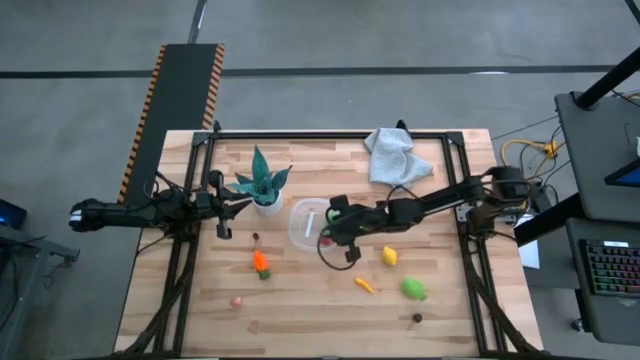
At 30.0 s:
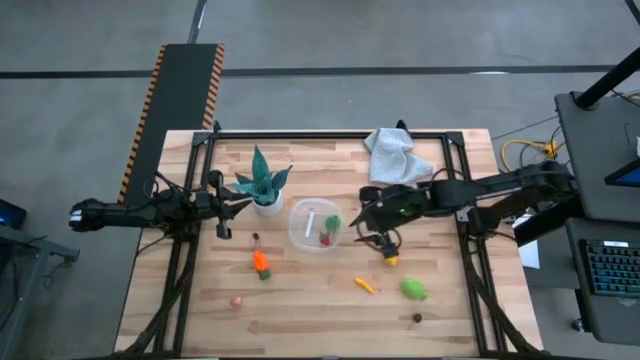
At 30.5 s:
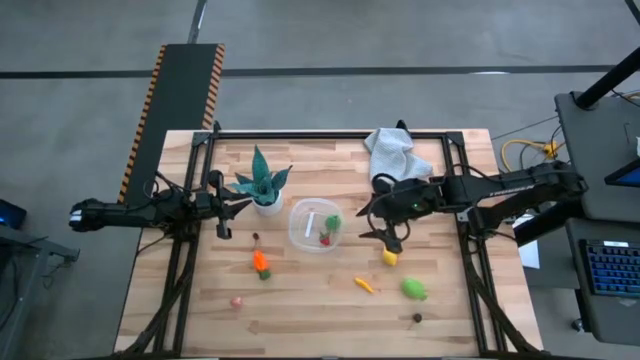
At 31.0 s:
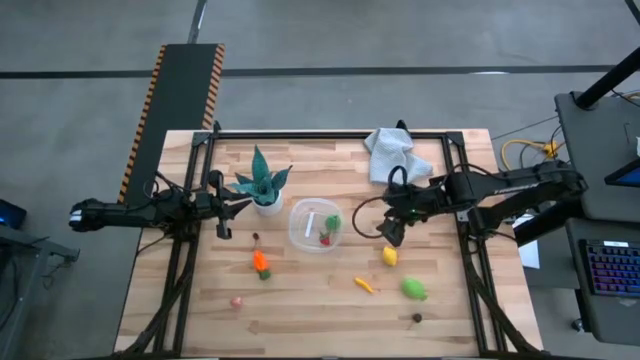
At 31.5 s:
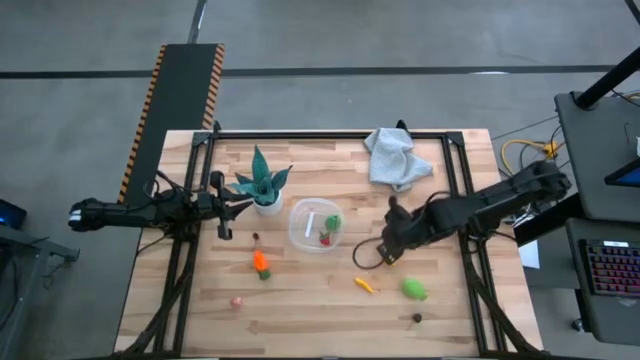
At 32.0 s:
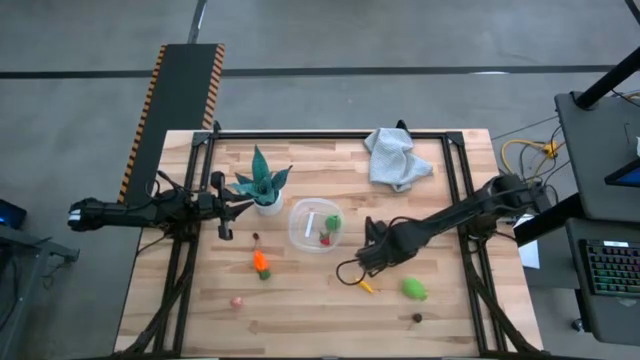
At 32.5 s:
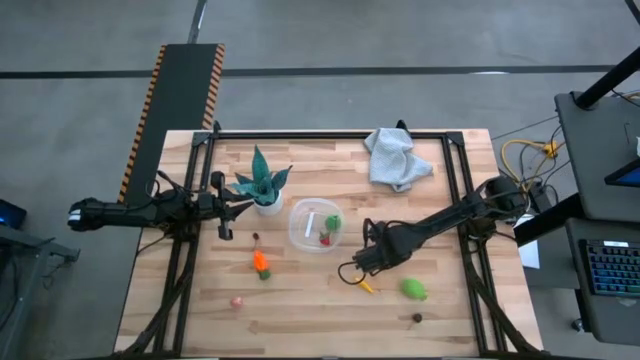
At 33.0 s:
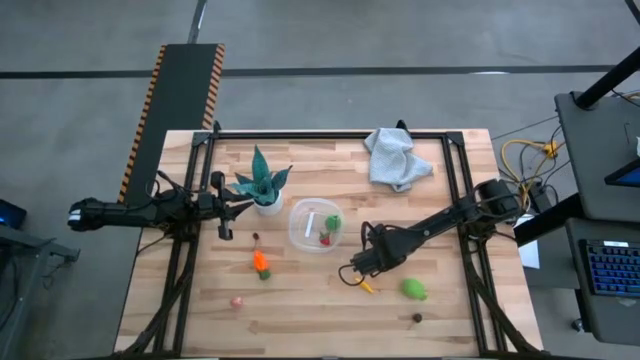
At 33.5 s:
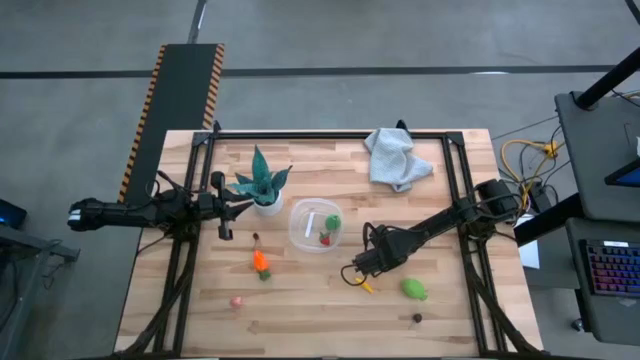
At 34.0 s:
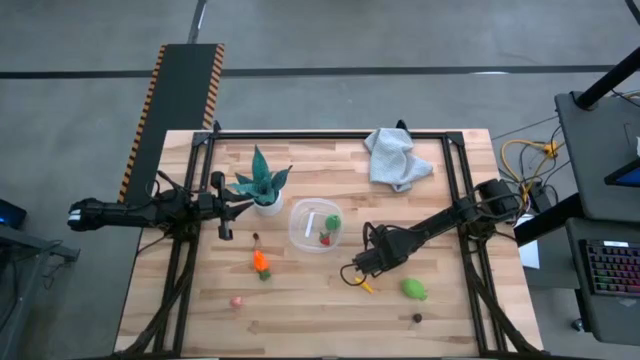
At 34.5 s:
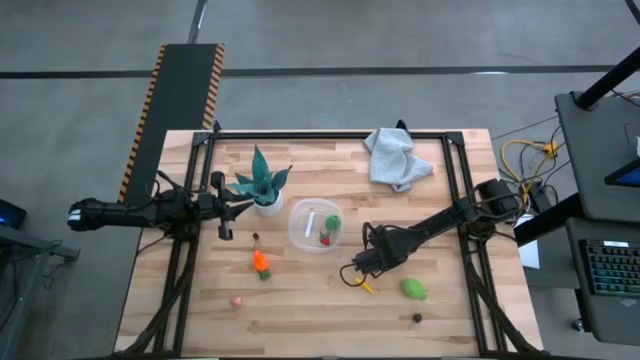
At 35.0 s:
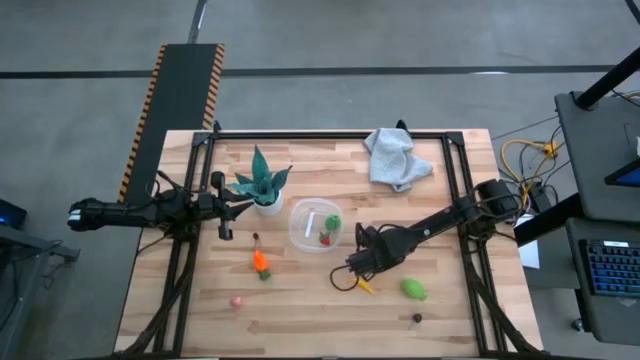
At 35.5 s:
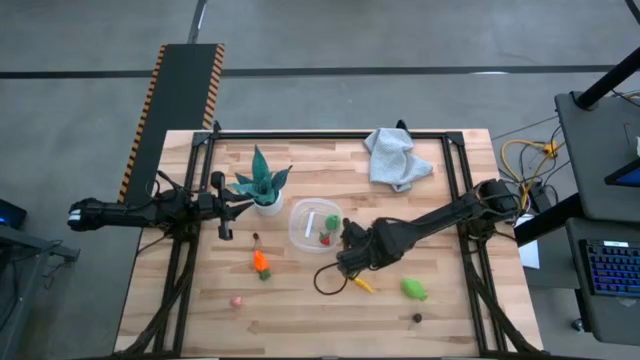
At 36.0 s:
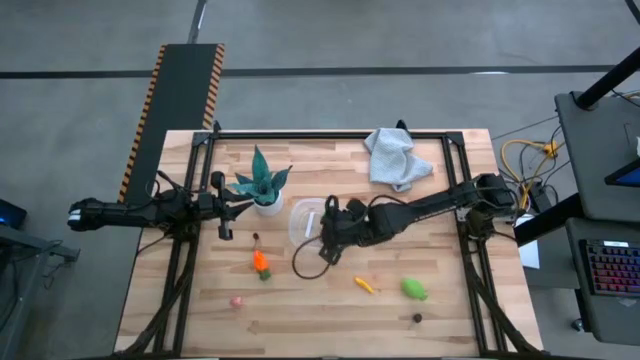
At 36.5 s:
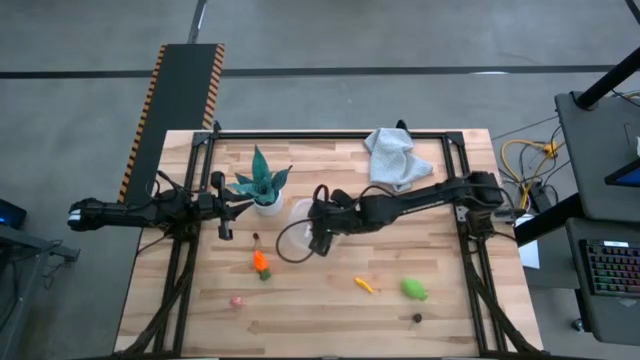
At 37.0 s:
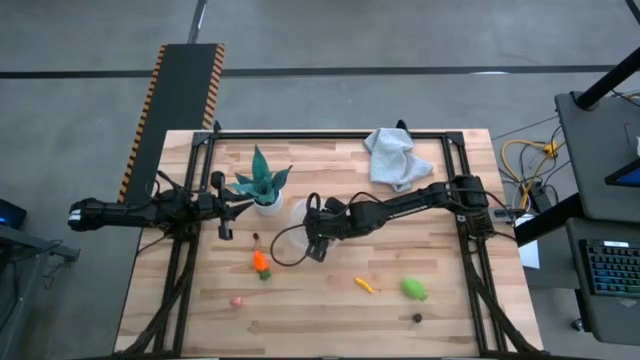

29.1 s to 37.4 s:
Task: Pick and placing Produce into tupperware
Put the yellow lemon into the container

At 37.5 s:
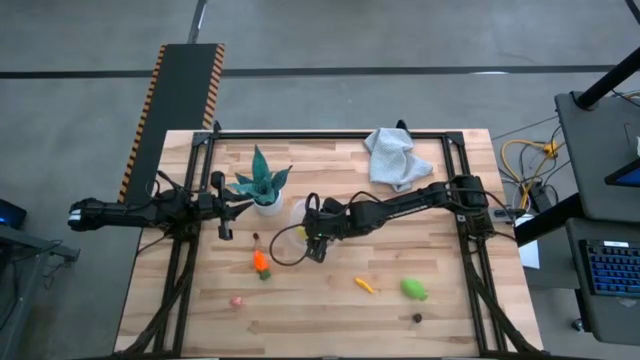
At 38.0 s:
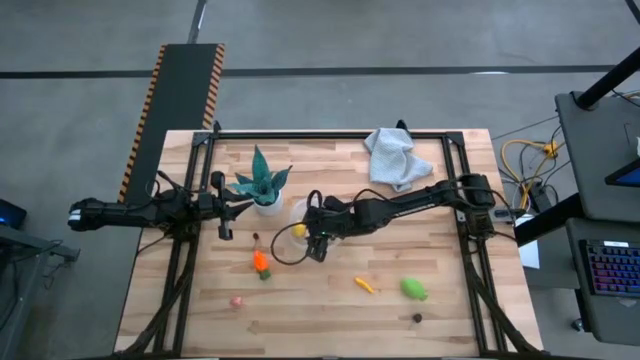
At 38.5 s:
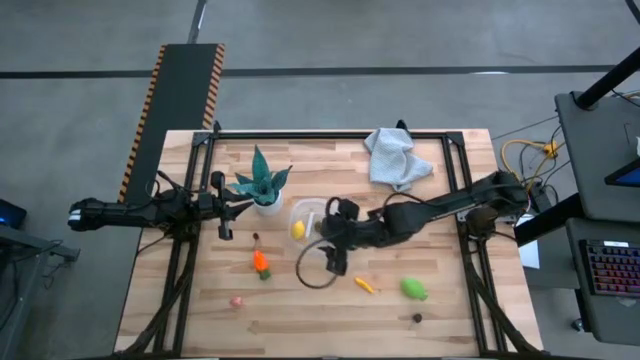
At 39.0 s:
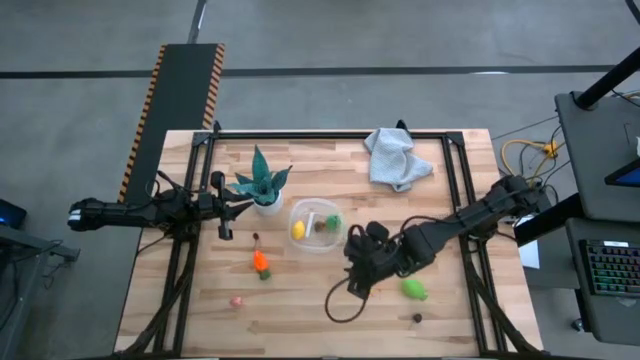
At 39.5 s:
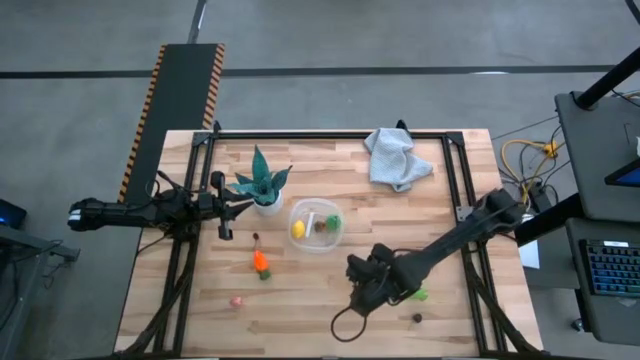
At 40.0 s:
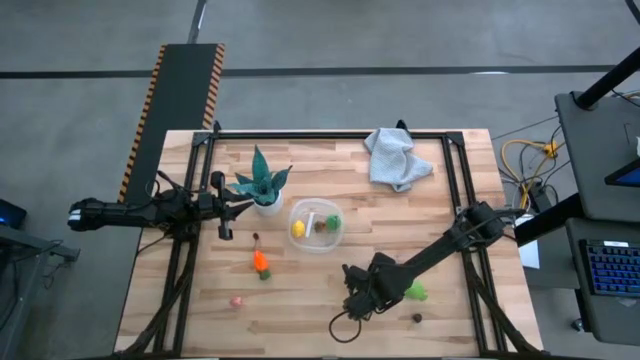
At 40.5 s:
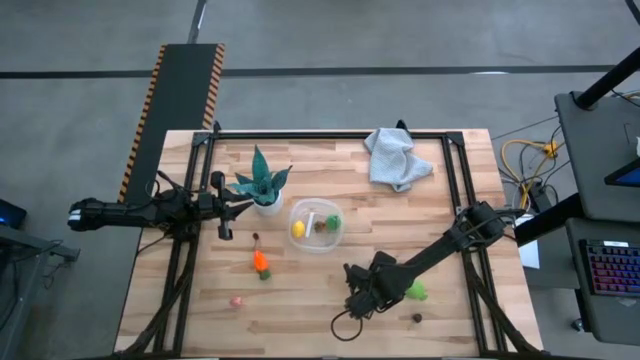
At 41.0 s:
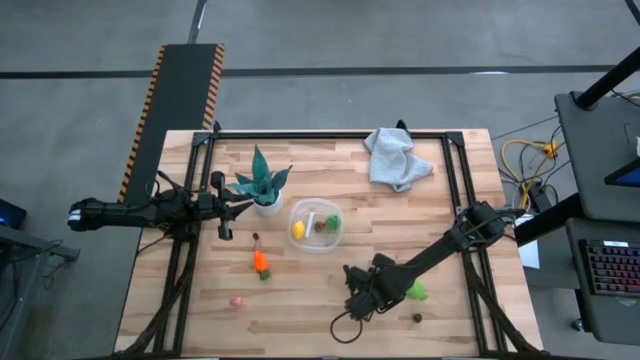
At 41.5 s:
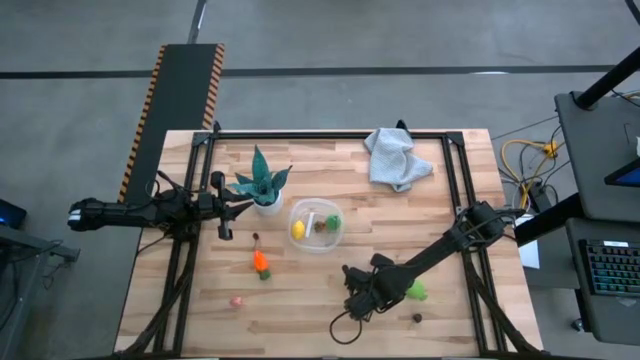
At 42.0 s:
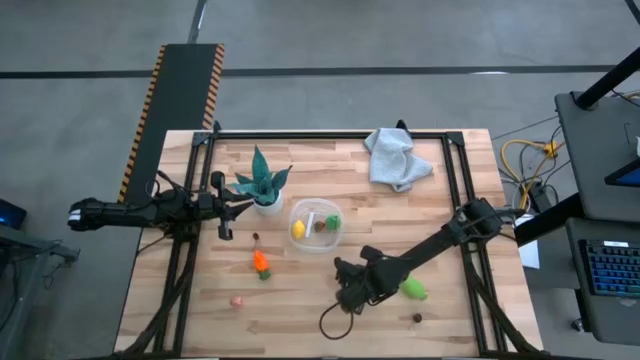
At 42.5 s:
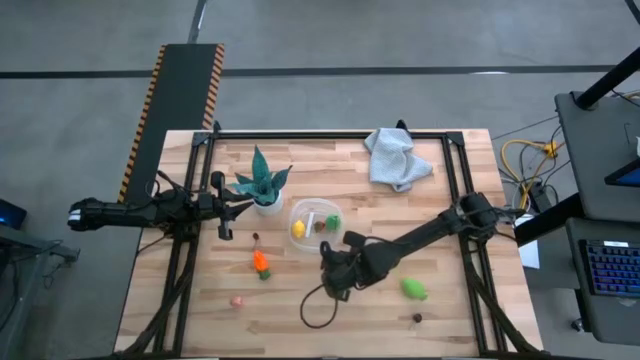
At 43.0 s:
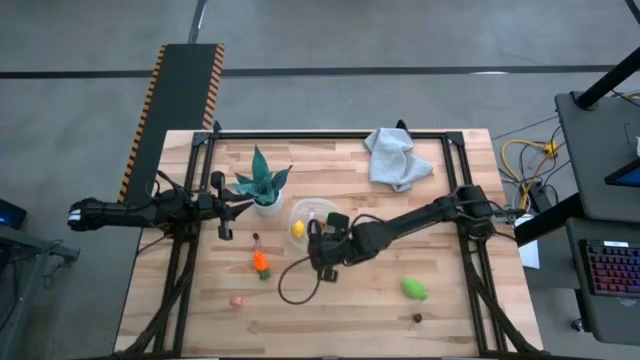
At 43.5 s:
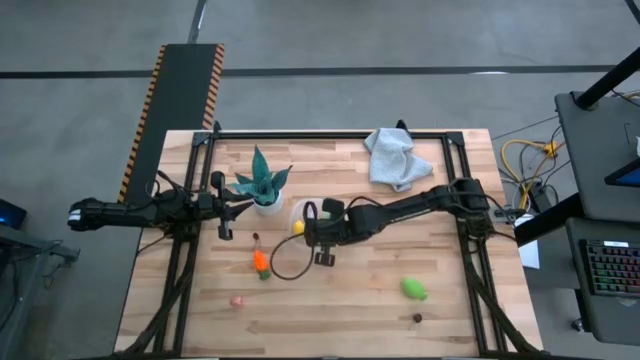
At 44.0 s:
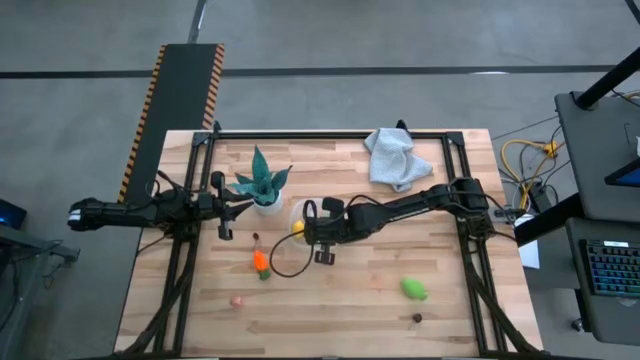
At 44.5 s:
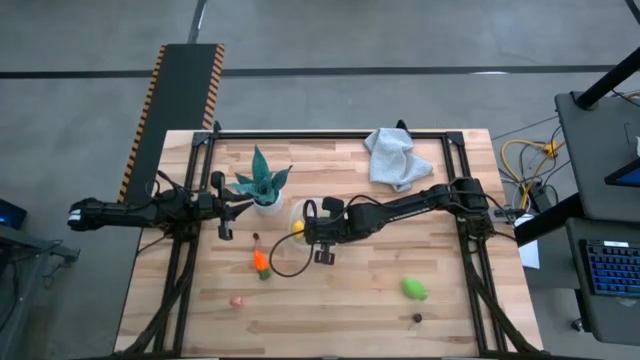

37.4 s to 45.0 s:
Put the yellow corn into the container

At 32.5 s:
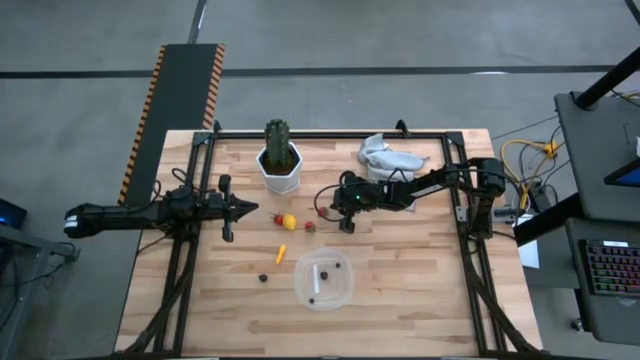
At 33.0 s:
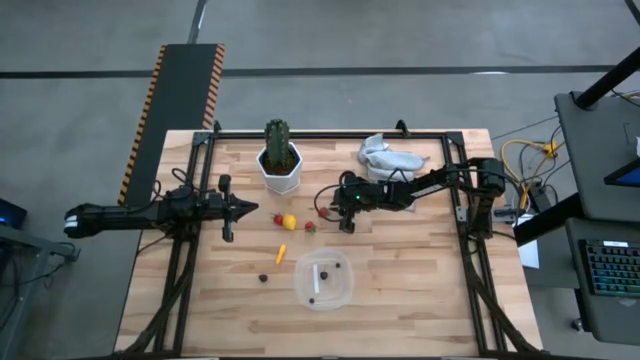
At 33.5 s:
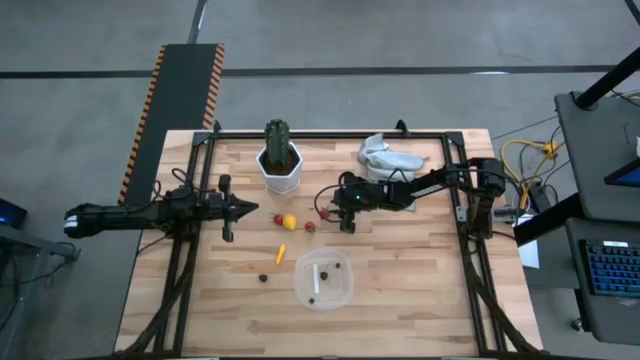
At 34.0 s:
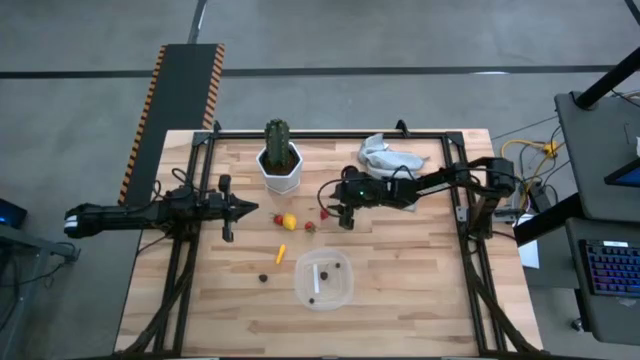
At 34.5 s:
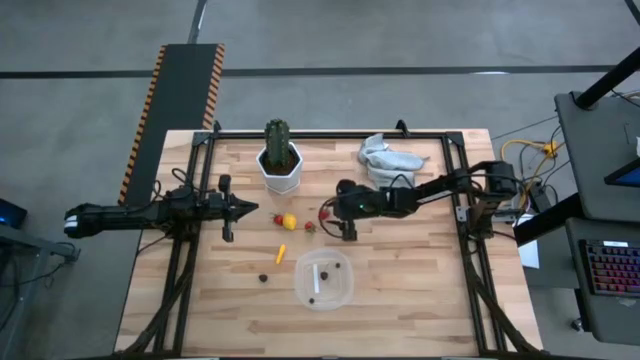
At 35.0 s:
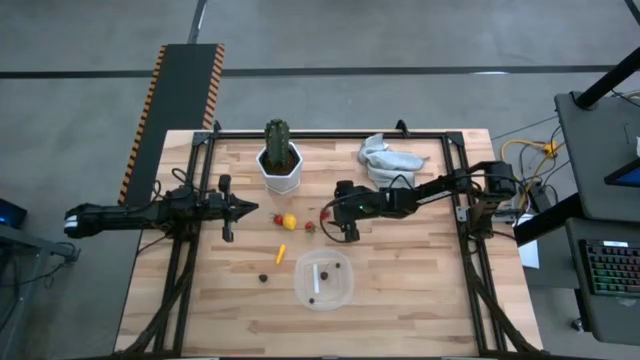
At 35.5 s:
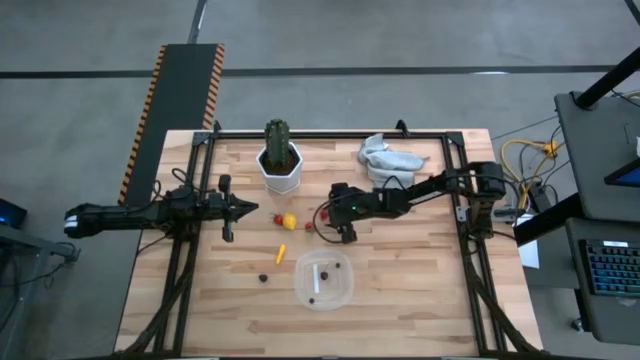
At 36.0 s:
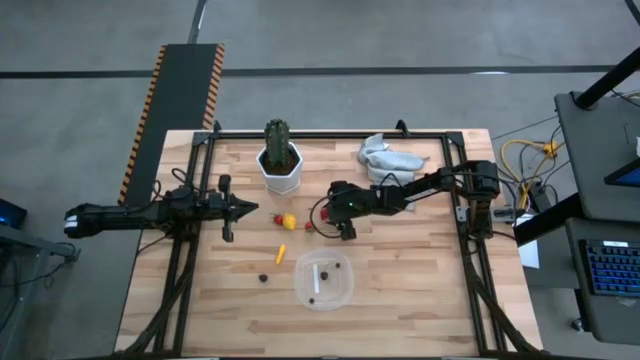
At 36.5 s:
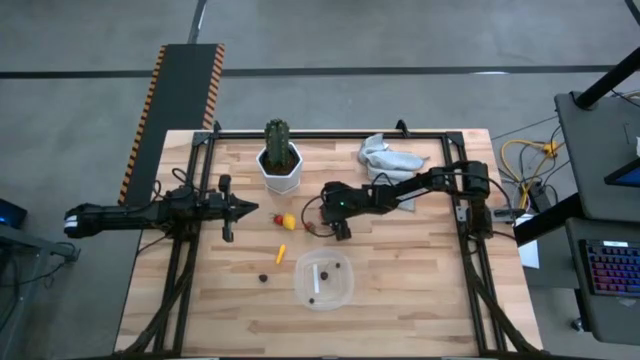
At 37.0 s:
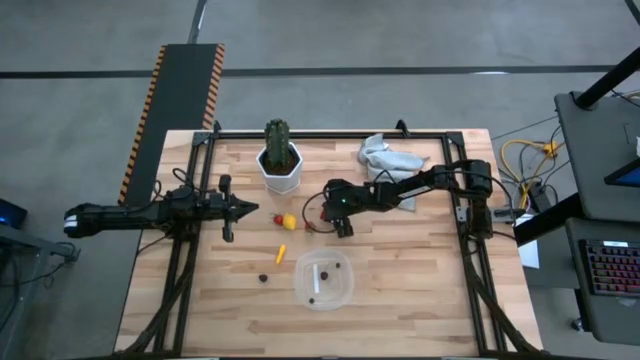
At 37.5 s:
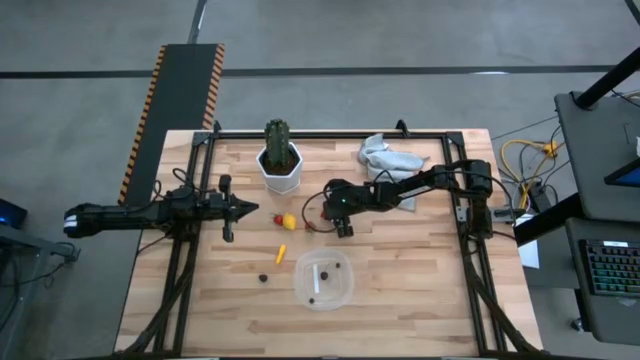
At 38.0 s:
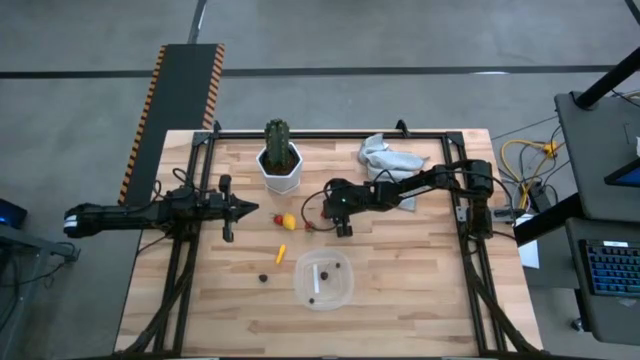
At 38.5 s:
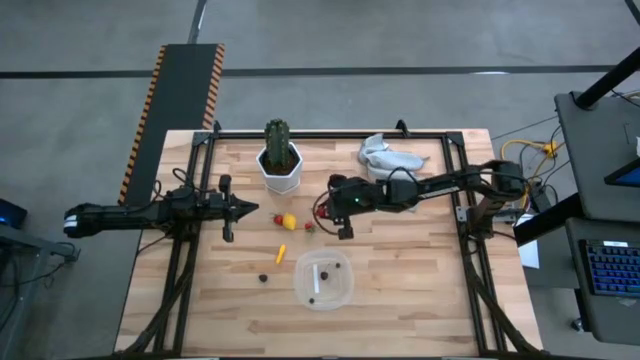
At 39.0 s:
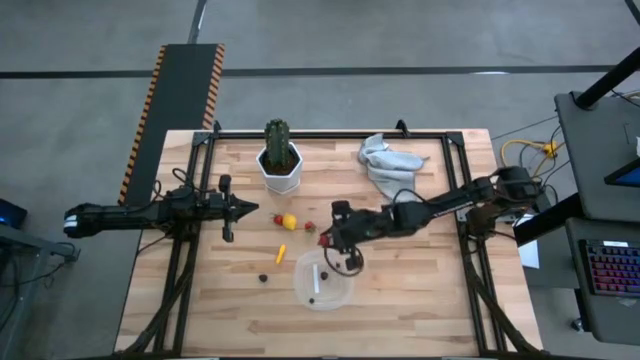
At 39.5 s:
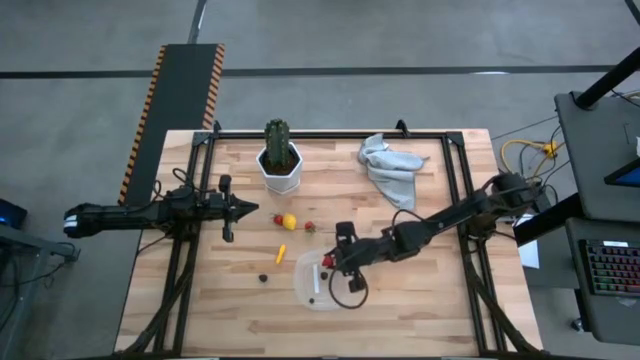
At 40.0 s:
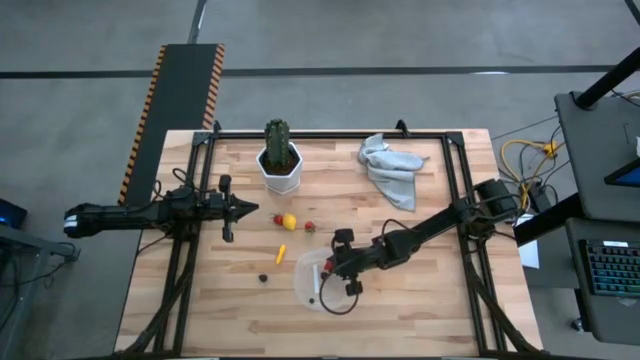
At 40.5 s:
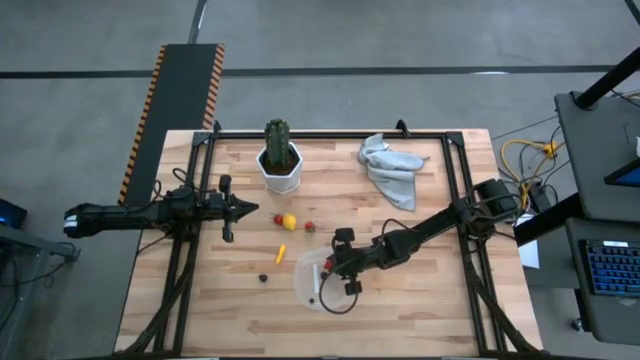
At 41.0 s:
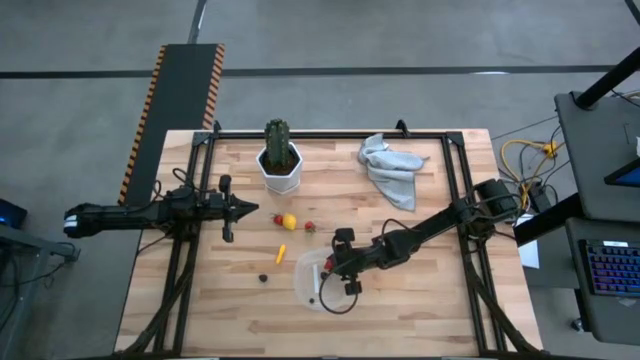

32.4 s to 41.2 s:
Task: Pick and placing Produce into tupperware
Put the top right red strawberry into the transparent container
